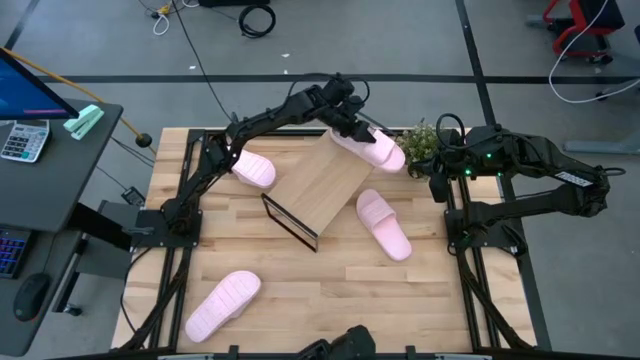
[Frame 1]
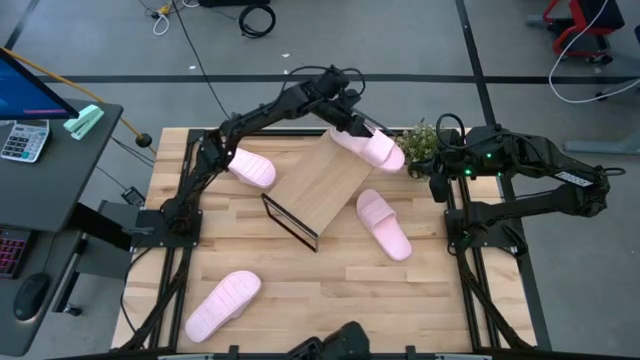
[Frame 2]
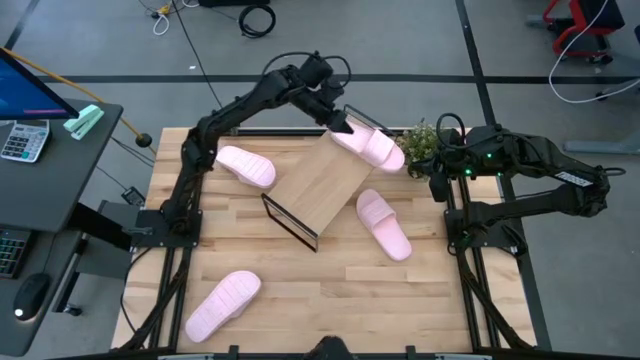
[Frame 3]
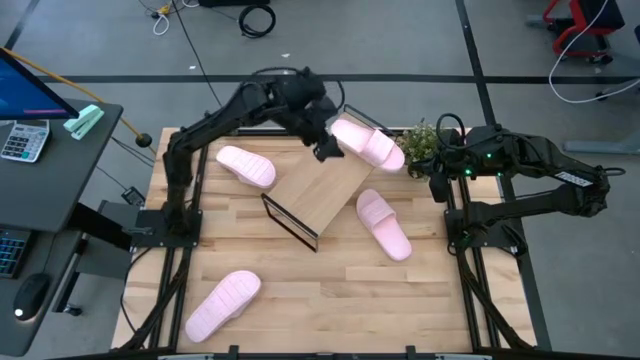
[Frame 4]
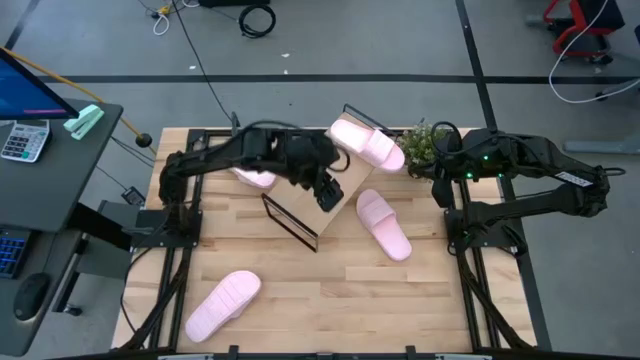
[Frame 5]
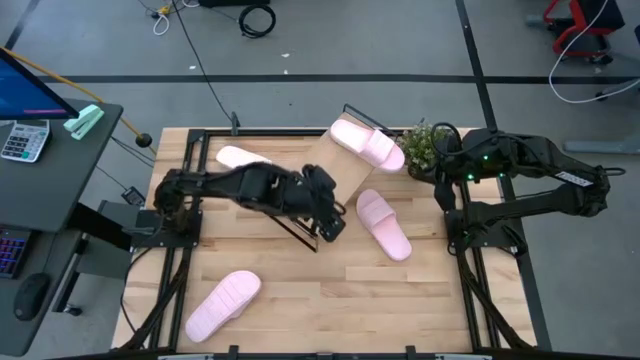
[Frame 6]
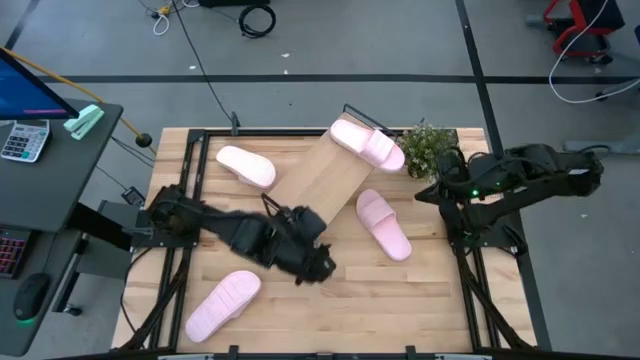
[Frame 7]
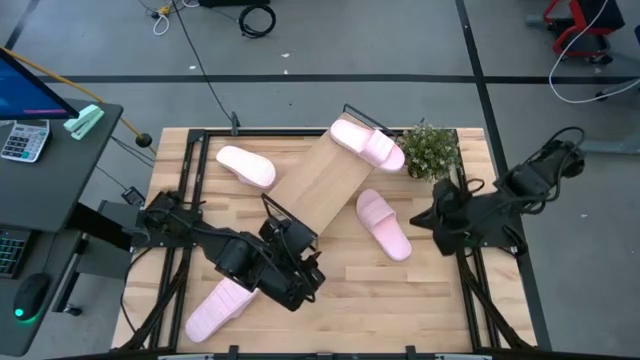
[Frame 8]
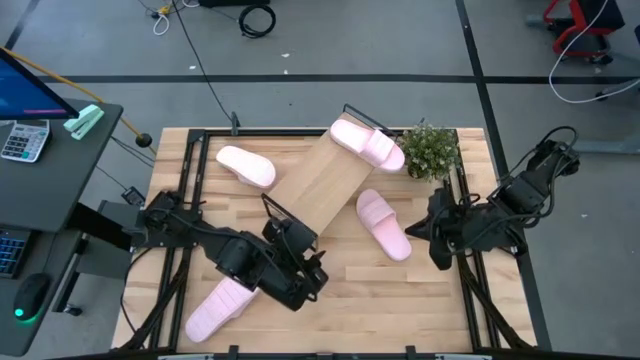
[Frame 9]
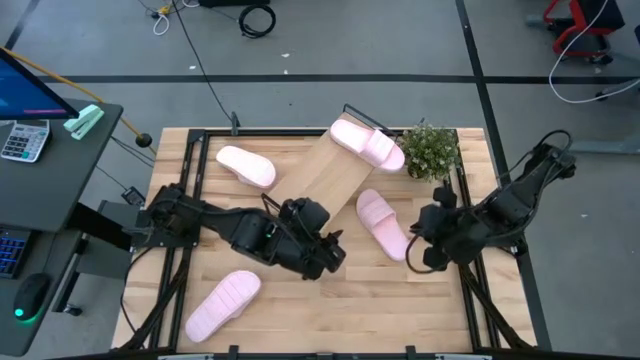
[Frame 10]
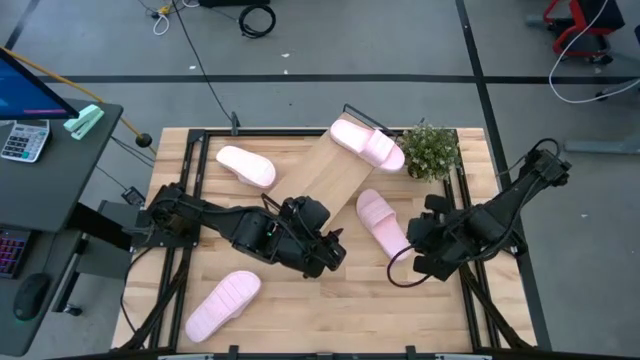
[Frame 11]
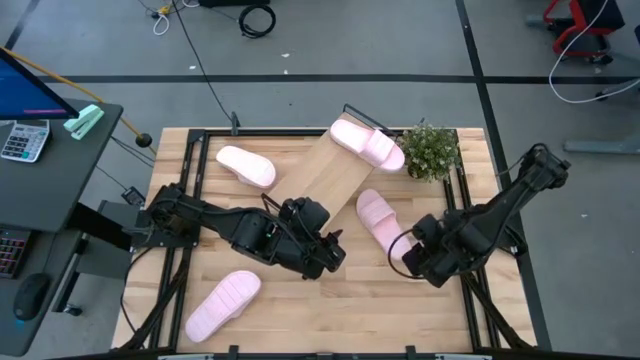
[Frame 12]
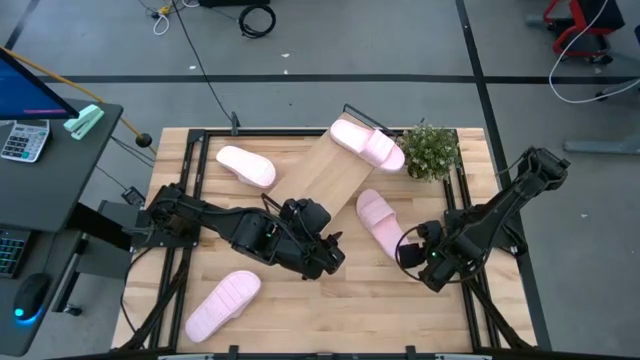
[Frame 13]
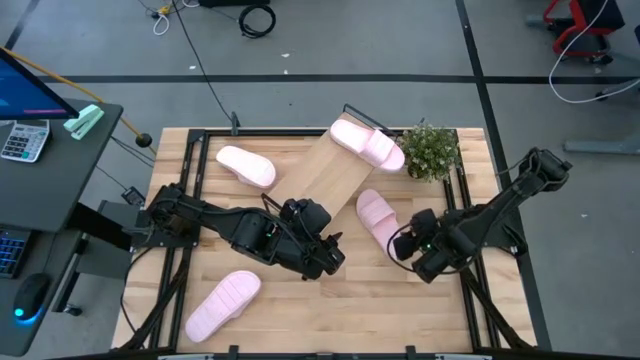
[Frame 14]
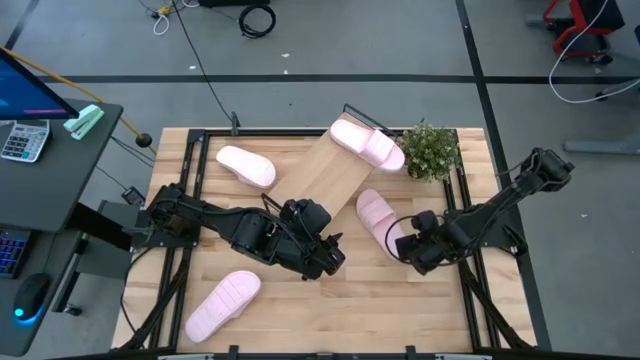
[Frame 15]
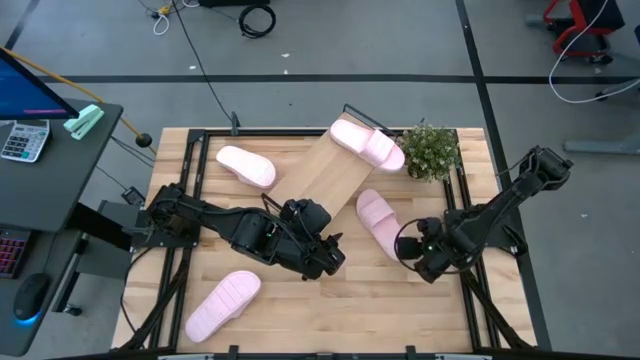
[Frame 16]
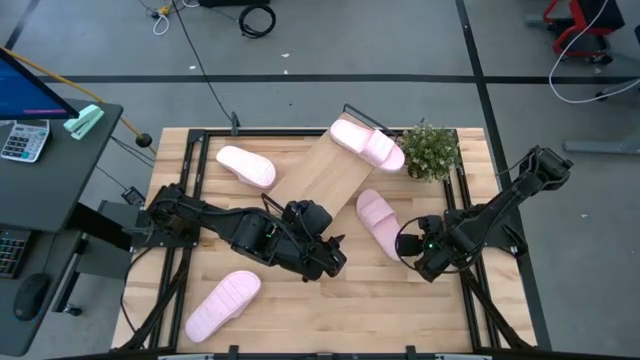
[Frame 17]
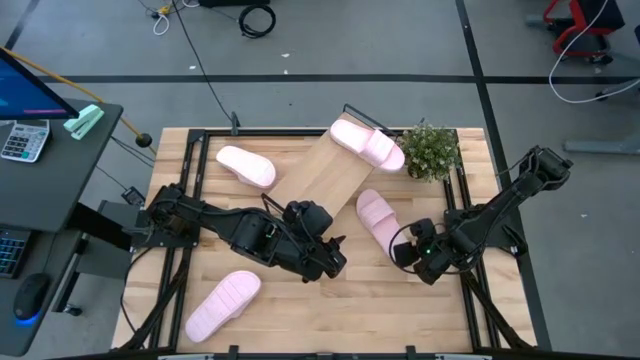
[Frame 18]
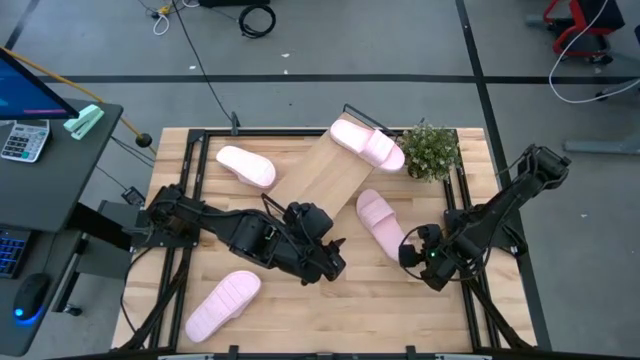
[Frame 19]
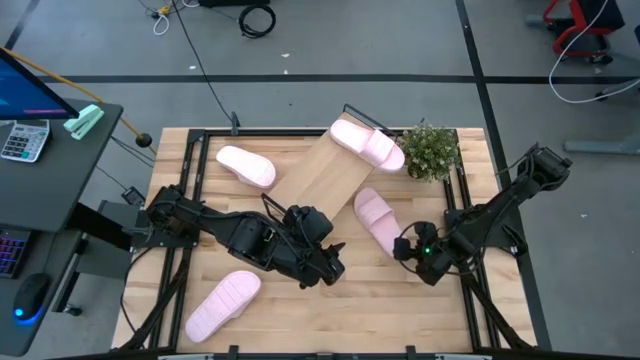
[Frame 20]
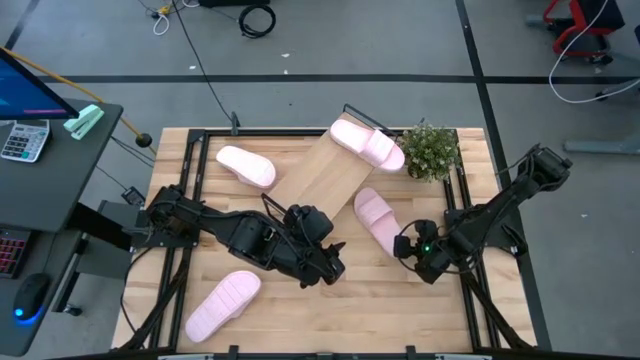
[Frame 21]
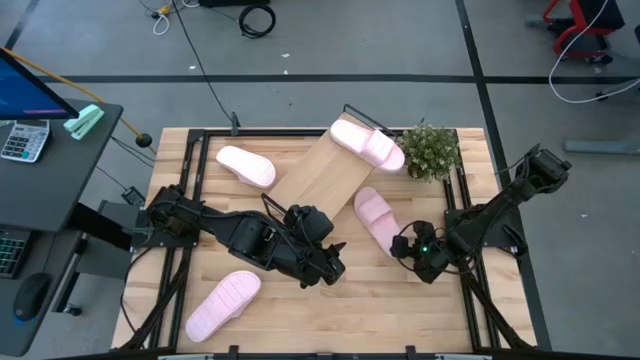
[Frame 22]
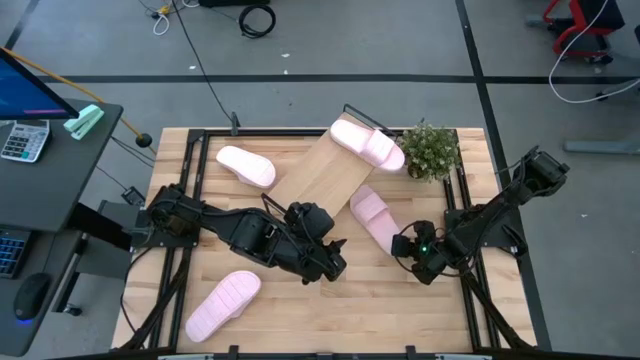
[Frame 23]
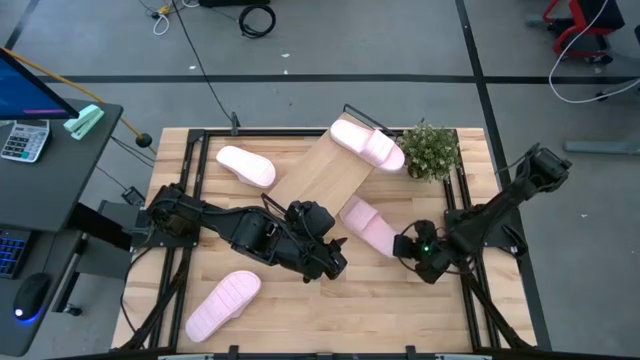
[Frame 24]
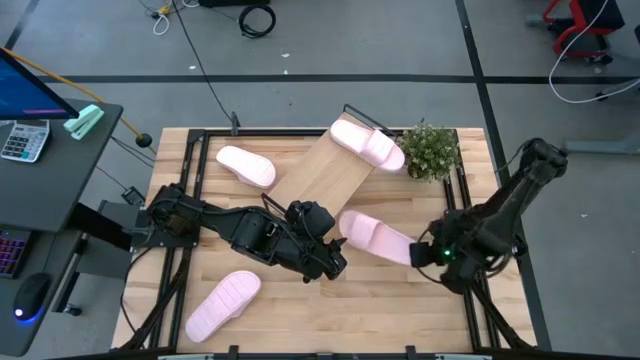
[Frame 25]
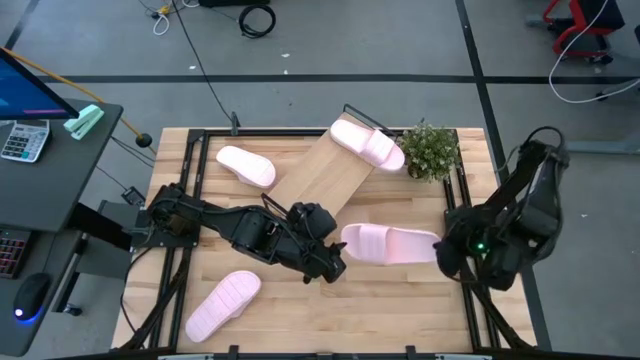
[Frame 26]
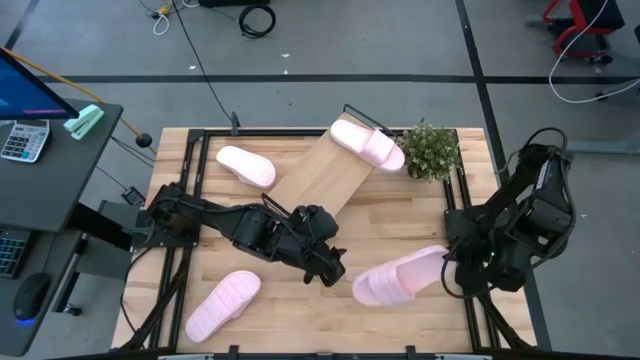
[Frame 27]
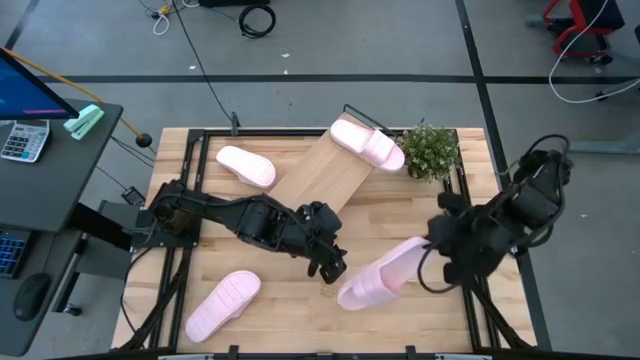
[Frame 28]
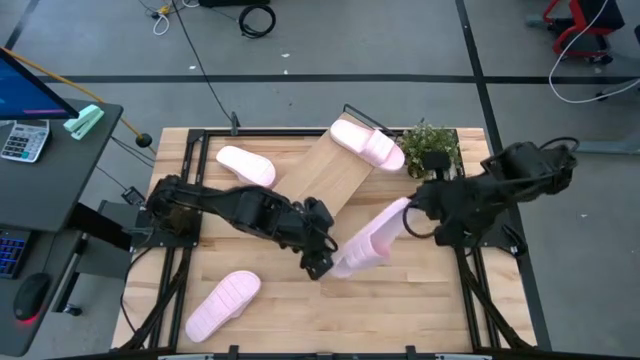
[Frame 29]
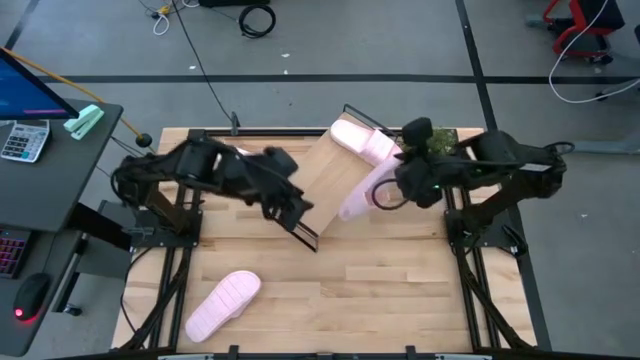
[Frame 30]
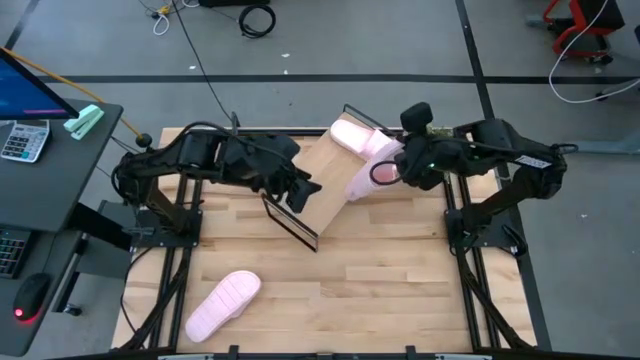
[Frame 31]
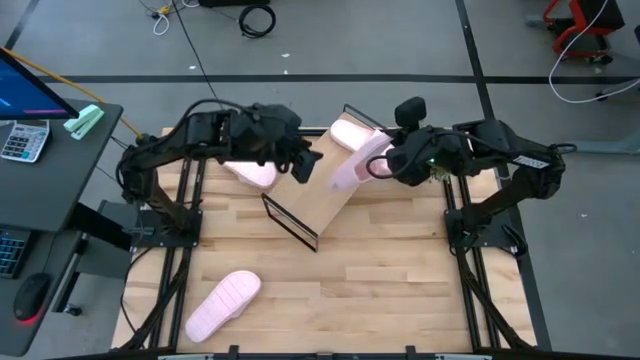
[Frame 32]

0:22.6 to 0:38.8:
Task: Pick and place slides into the shelf
Put the top right pink slide on the shelf

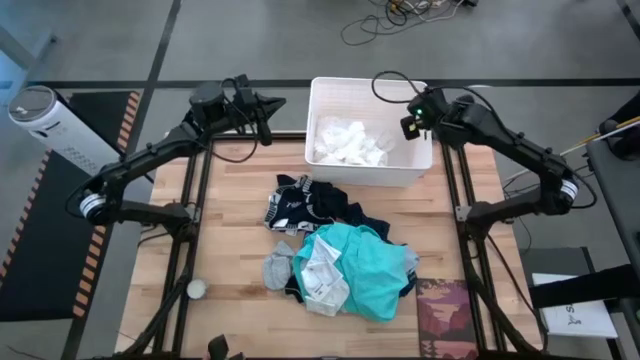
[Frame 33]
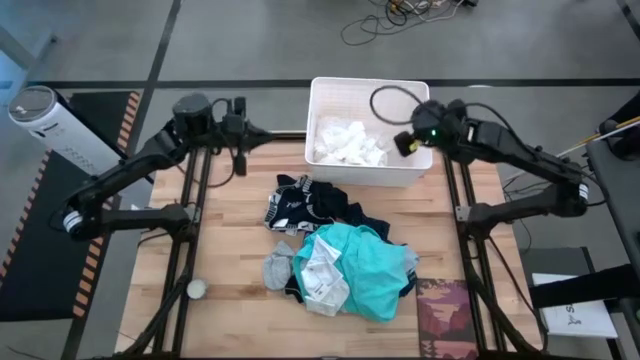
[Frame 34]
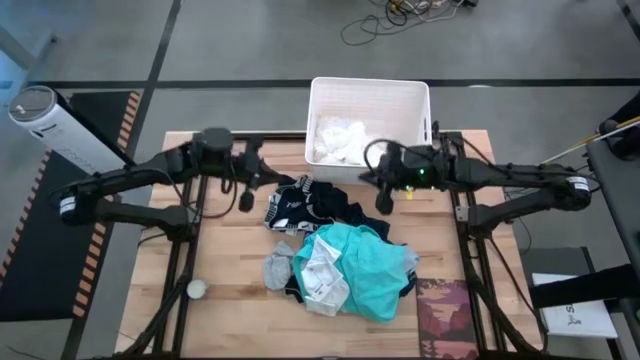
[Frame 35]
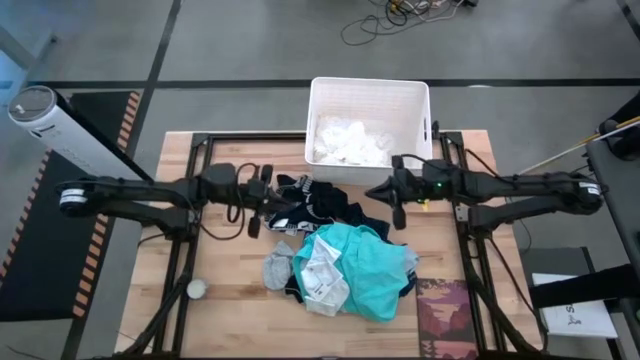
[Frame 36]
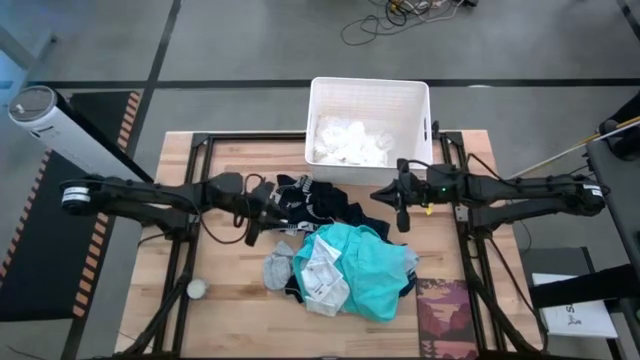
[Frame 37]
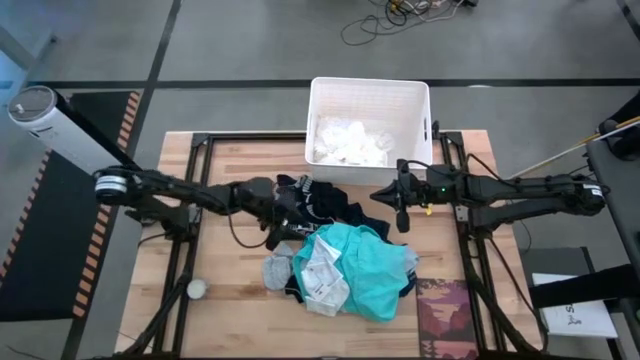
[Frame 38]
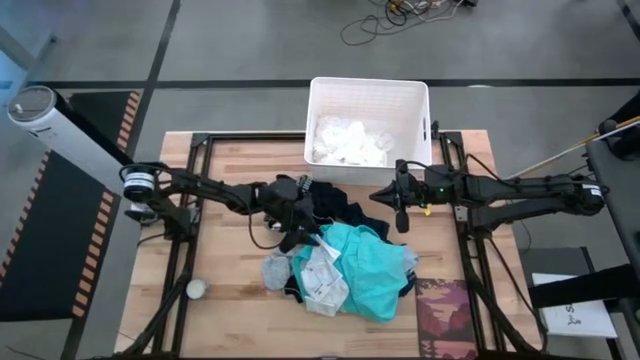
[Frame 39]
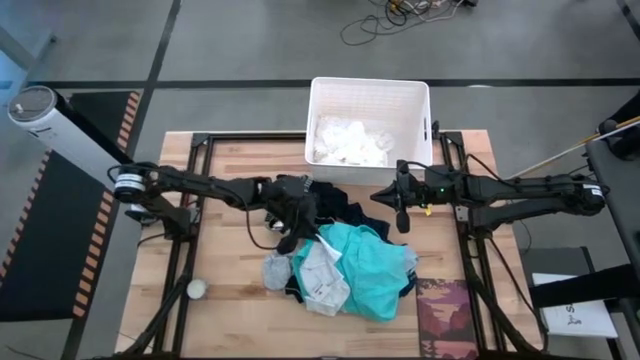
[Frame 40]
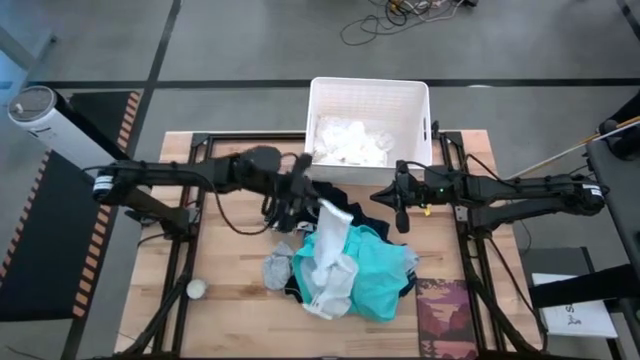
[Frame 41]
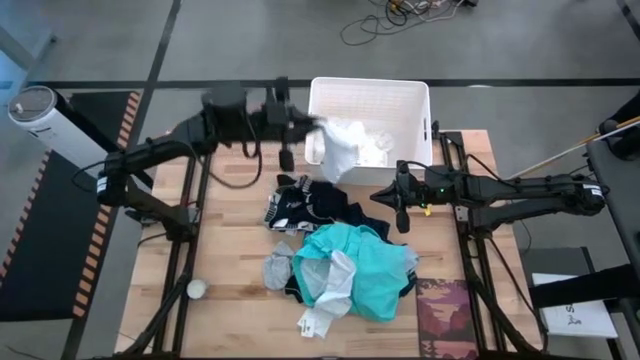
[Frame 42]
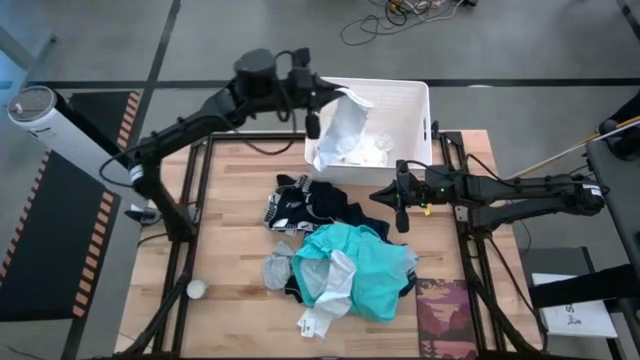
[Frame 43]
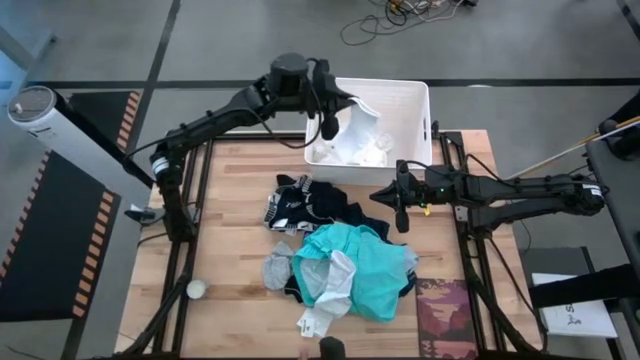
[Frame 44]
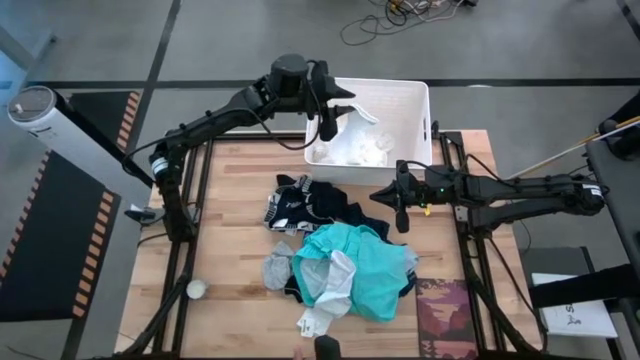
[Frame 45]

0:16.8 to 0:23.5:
Task: Sort clothes
Put the white sock into the white laundry bin
